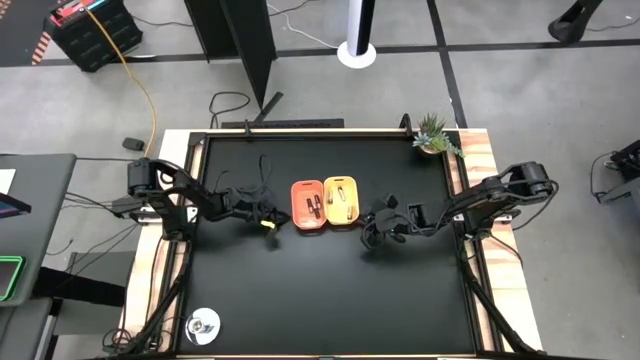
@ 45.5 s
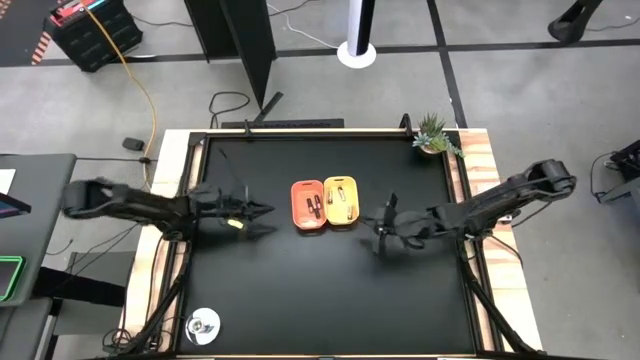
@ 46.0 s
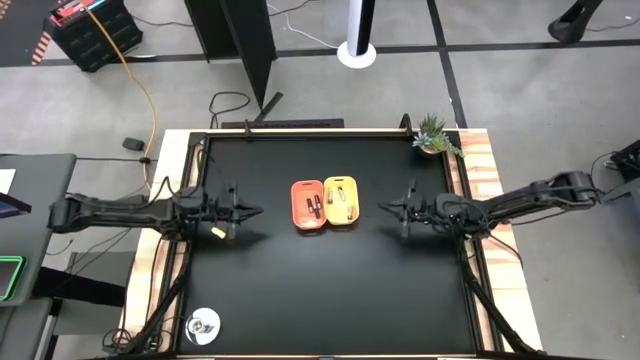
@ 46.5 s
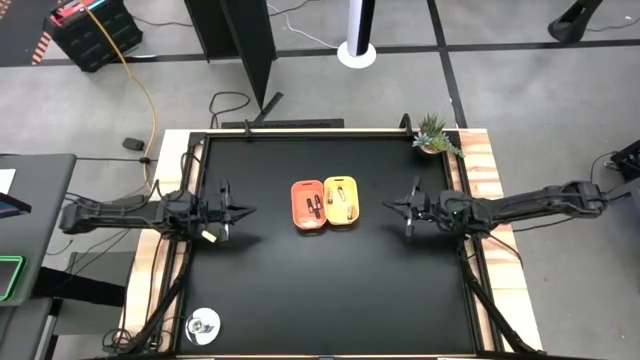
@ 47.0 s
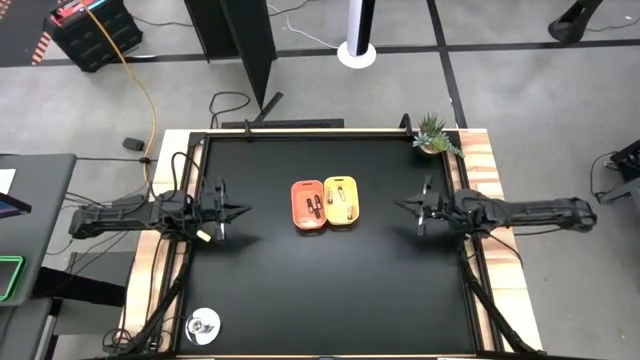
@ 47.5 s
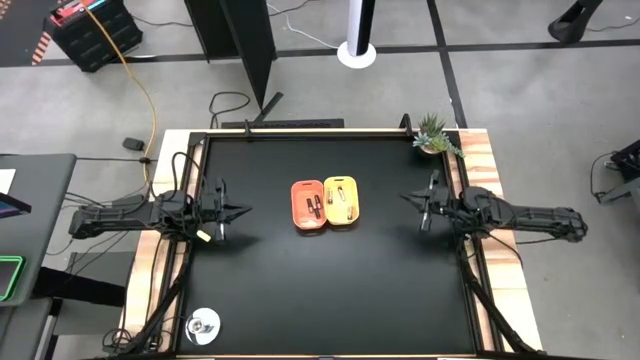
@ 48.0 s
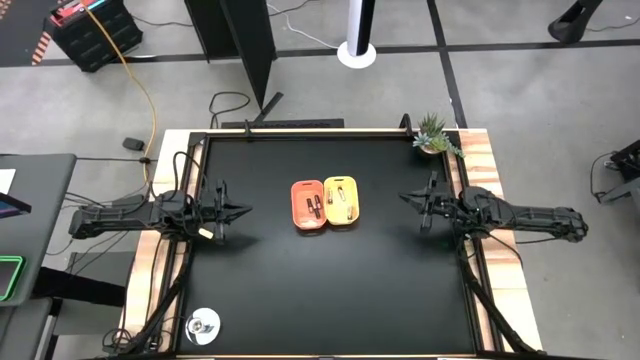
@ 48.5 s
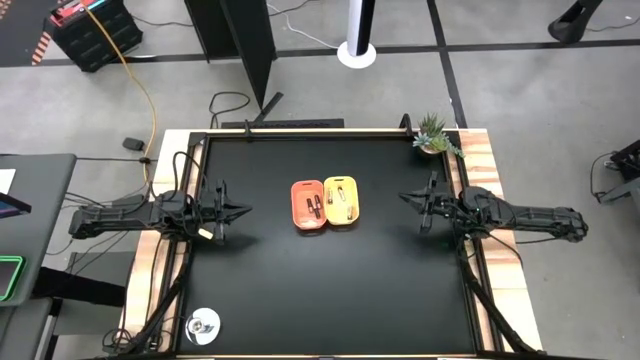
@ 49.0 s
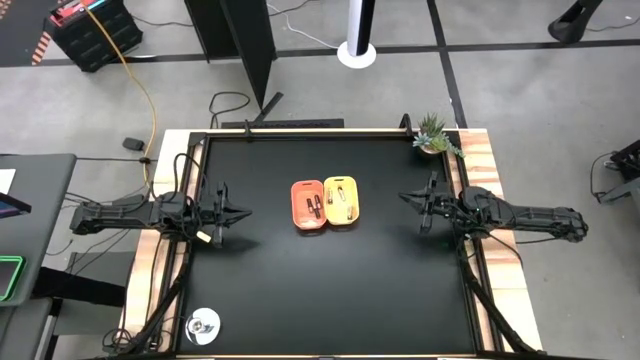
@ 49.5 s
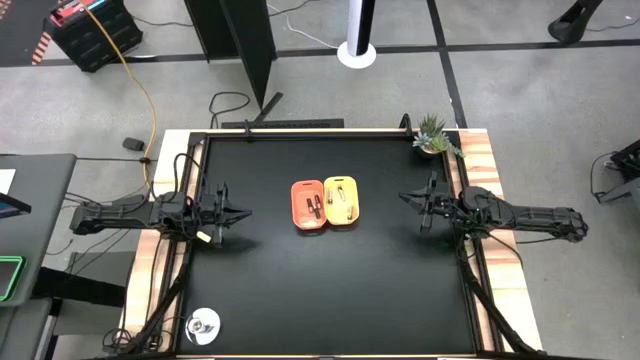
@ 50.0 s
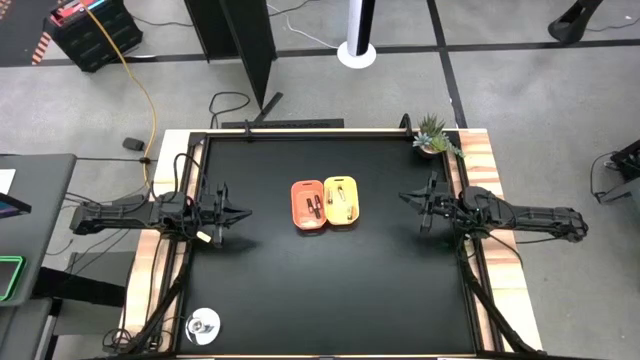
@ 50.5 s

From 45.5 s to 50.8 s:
Task: Sort batteries
Return to Home Position

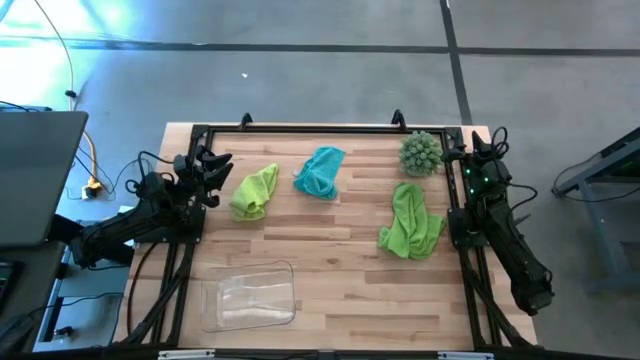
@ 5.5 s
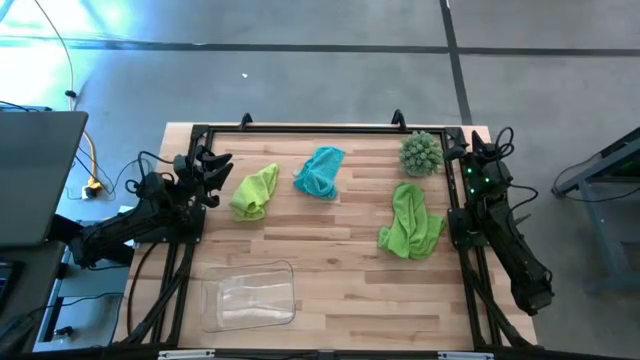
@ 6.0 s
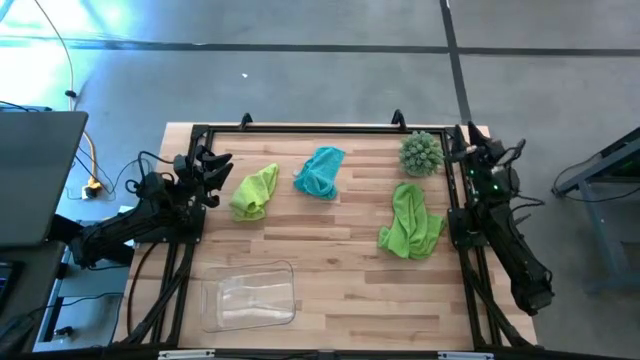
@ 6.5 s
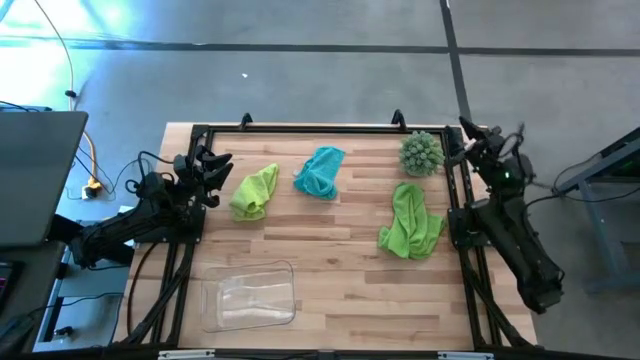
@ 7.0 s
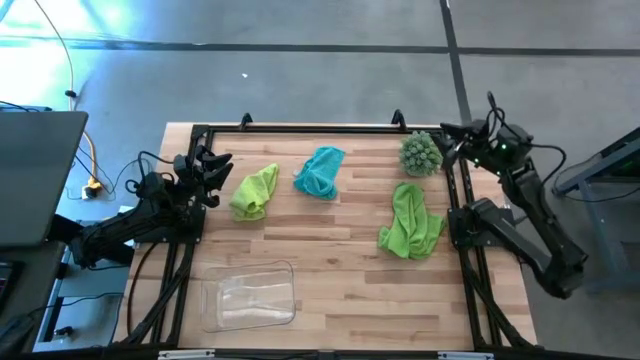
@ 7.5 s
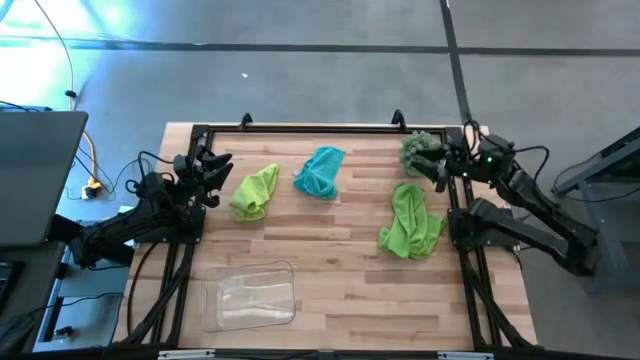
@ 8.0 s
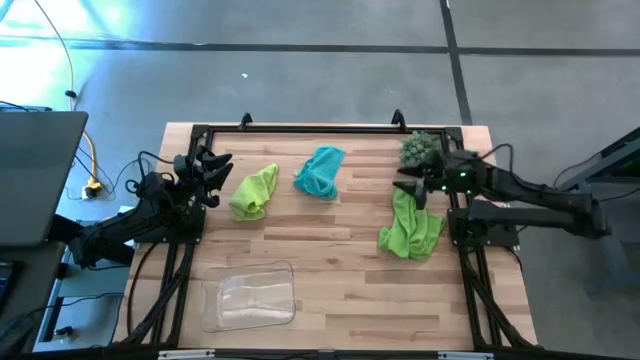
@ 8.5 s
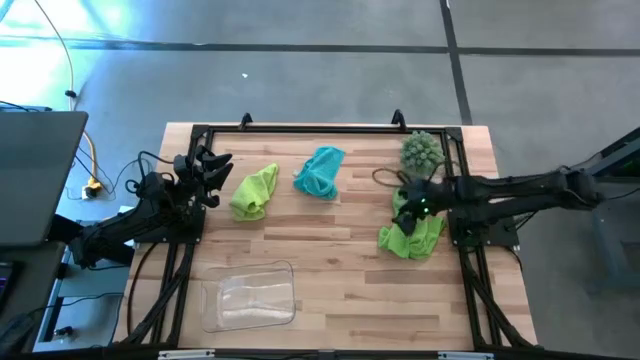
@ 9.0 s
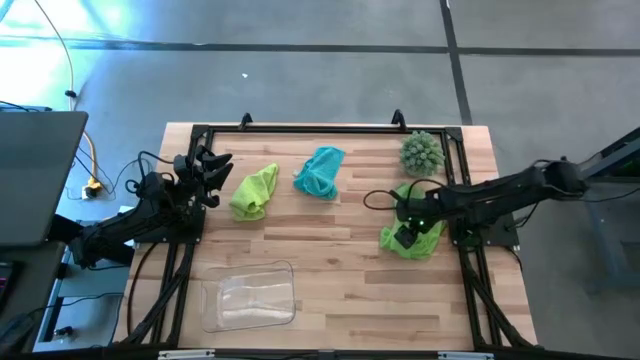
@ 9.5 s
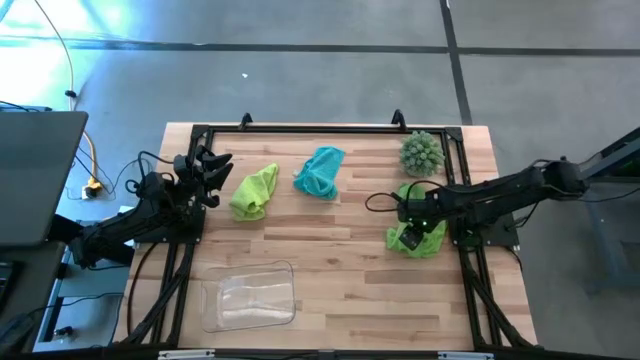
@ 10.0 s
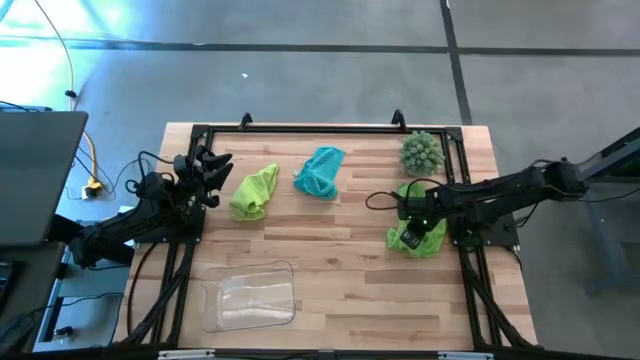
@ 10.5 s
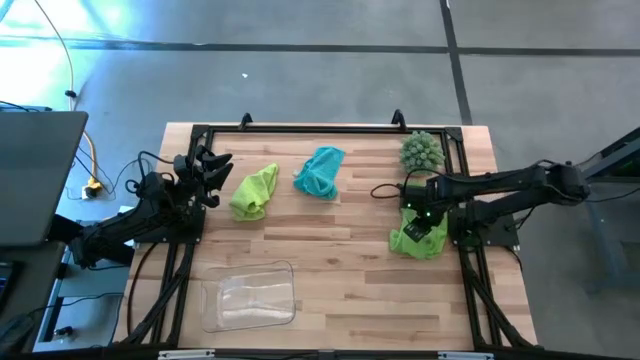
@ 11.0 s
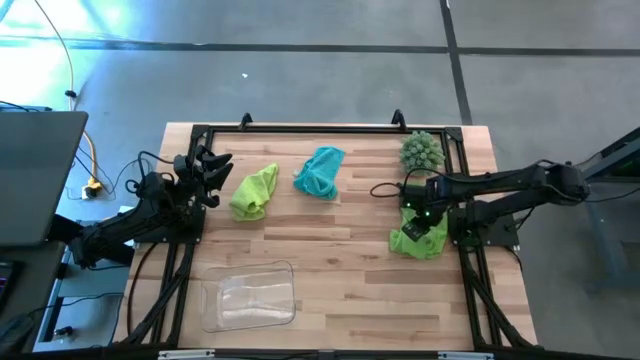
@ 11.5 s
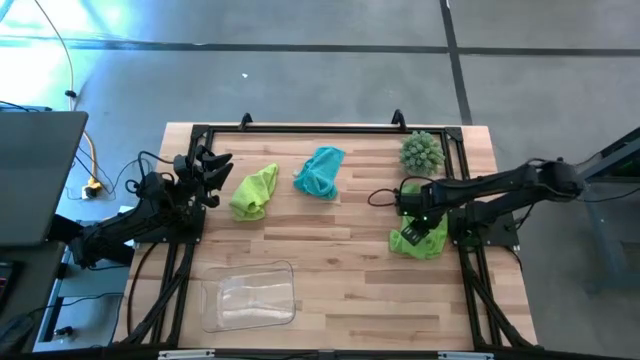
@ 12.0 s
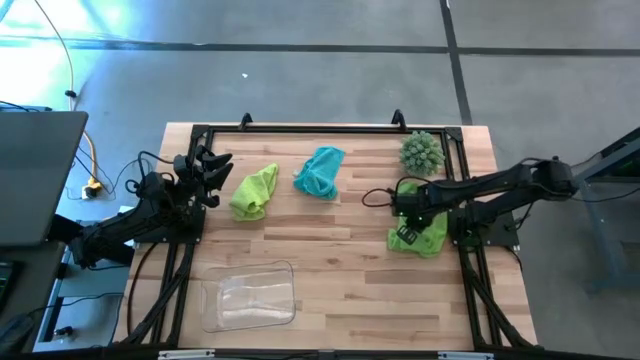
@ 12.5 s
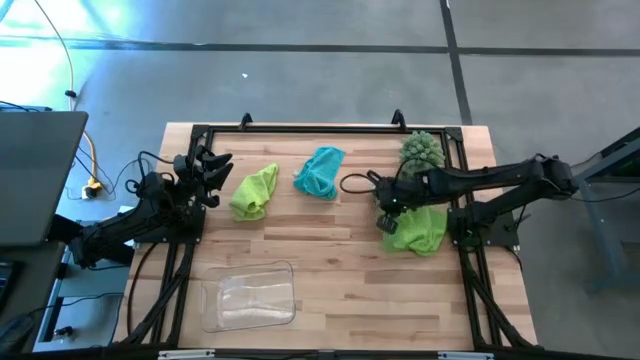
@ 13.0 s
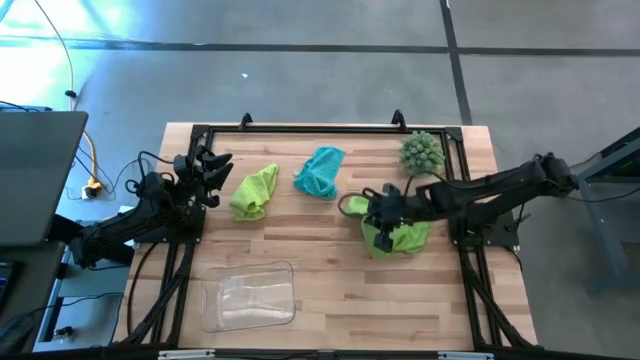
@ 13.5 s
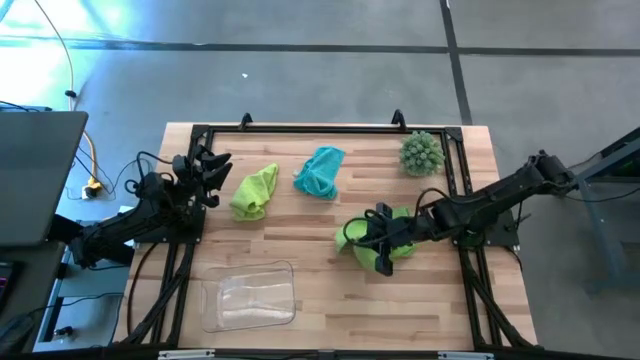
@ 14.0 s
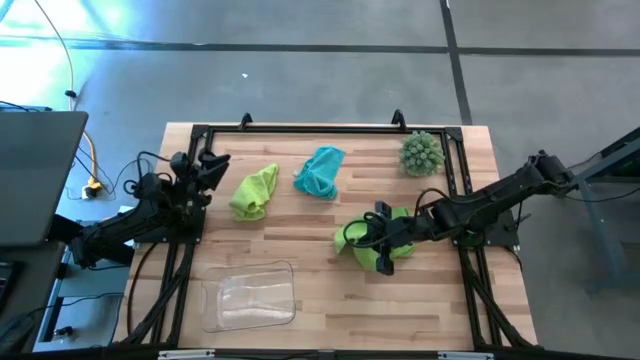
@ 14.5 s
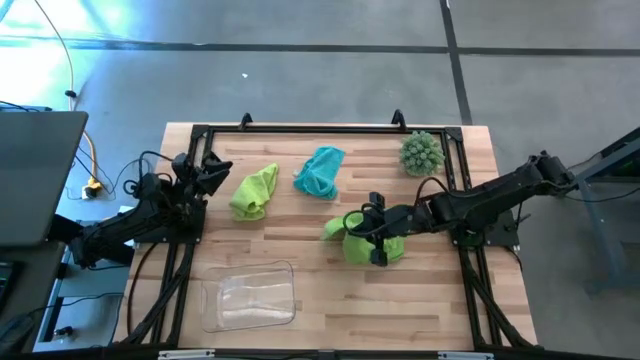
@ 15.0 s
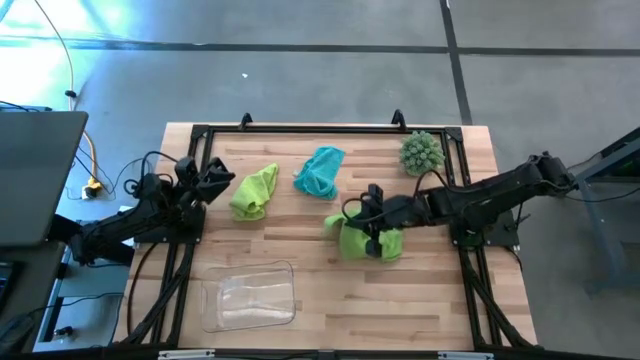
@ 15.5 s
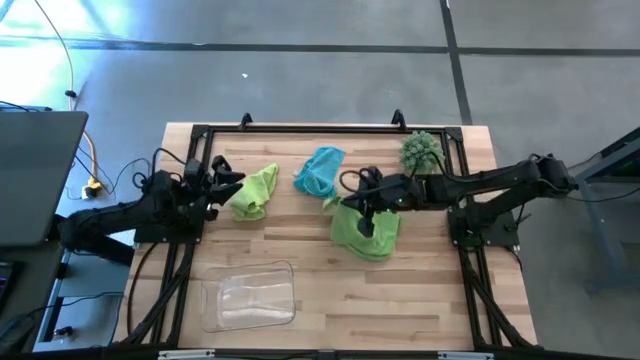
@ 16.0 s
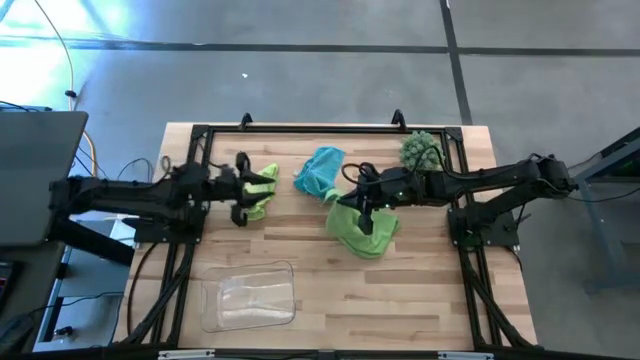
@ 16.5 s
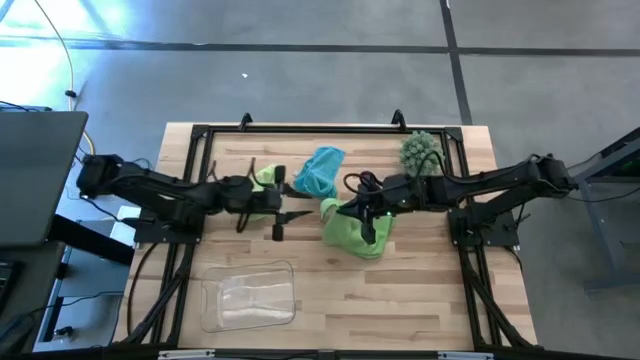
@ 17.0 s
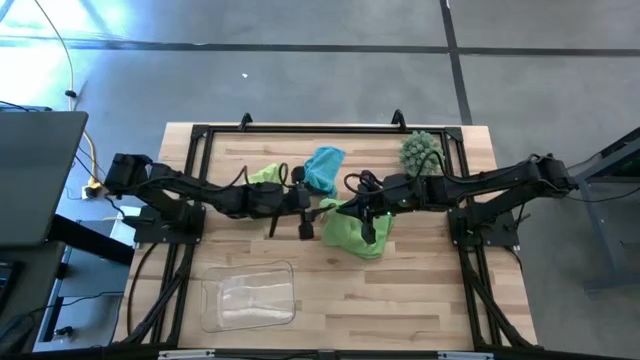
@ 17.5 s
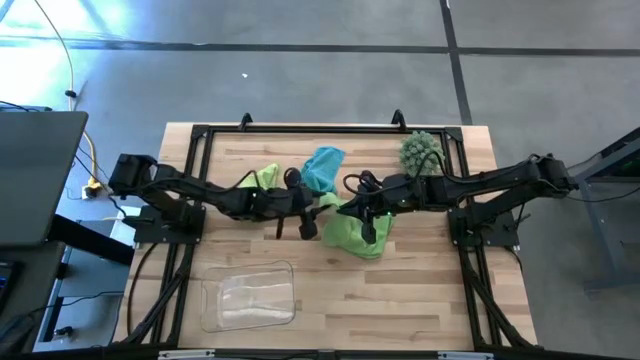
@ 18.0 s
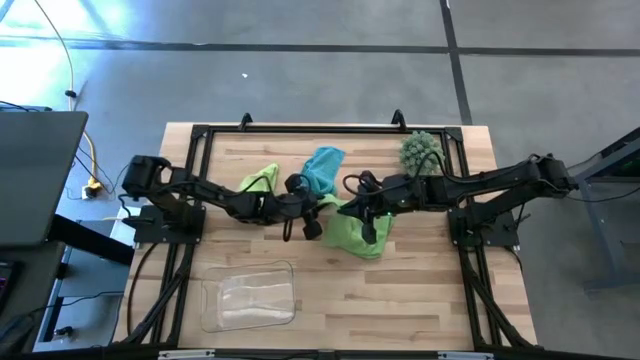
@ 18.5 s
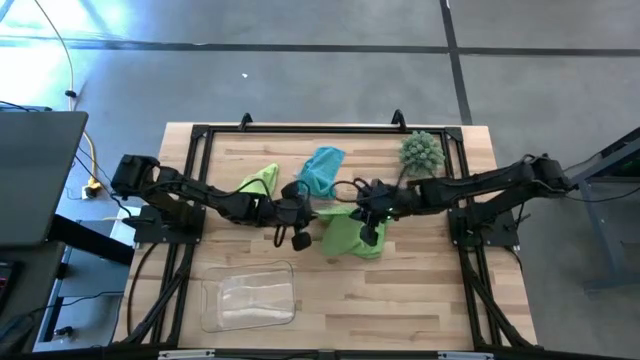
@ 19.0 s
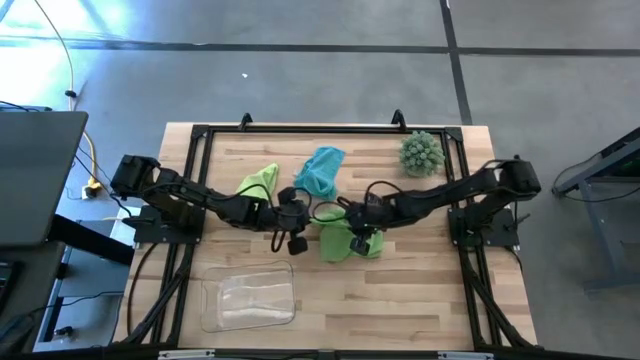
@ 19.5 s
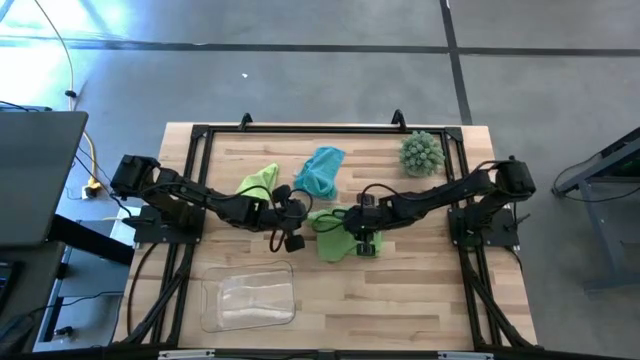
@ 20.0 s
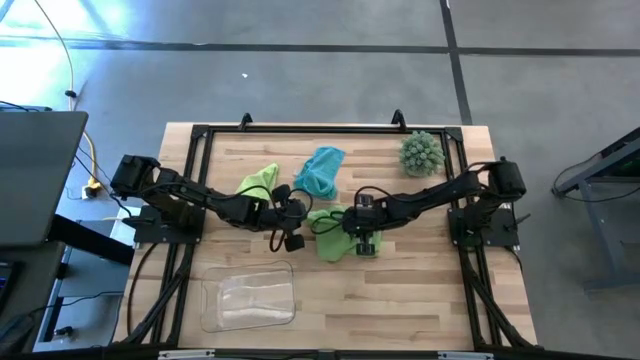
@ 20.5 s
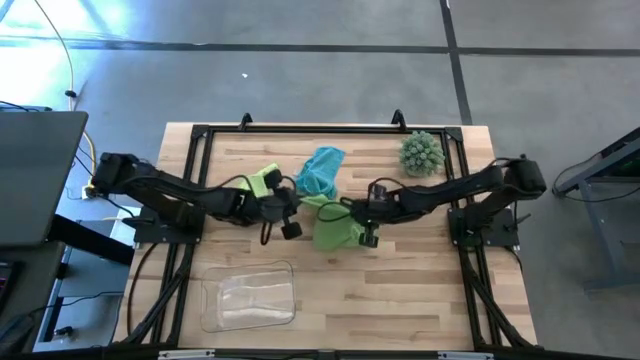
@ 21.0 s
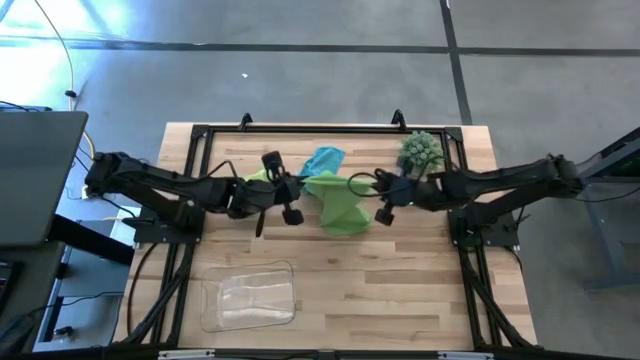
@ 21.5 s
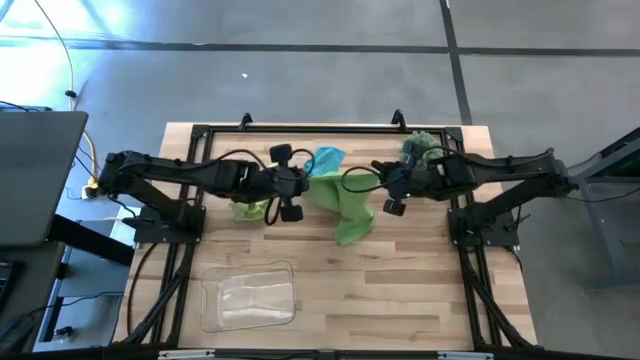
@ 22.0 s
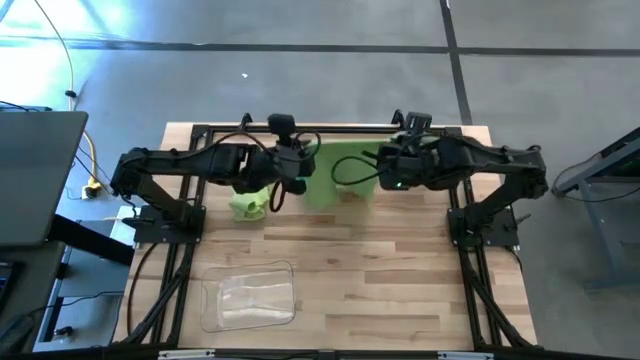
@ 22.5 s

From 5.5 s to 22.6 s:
Task: Roll microfiber towels into tight, uniform cylinder then place into a basket
Roll the green microfiber cloth
